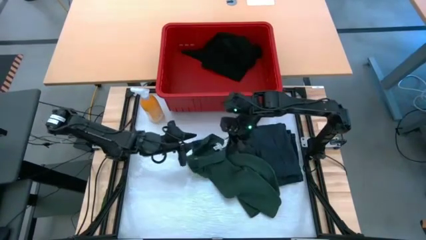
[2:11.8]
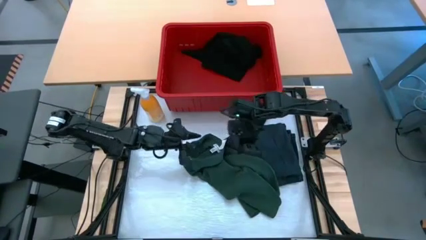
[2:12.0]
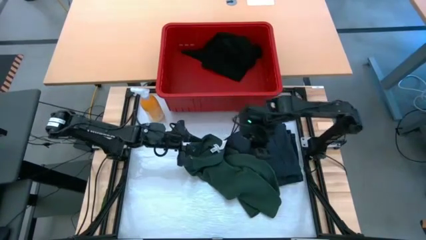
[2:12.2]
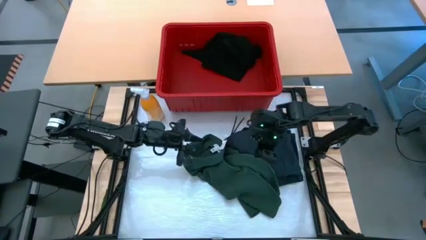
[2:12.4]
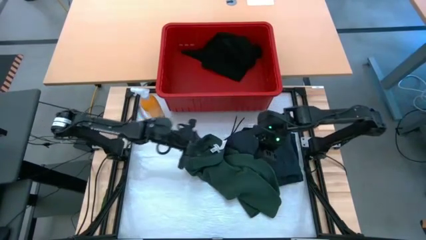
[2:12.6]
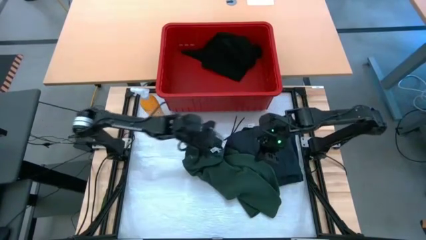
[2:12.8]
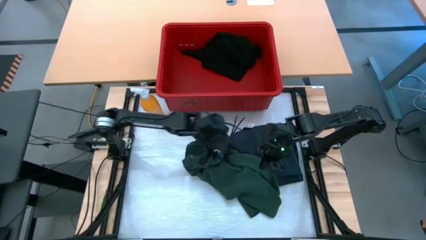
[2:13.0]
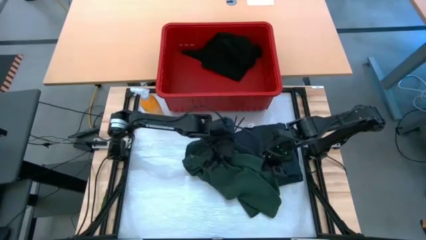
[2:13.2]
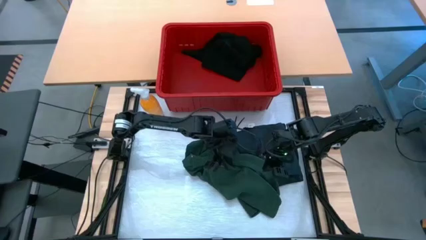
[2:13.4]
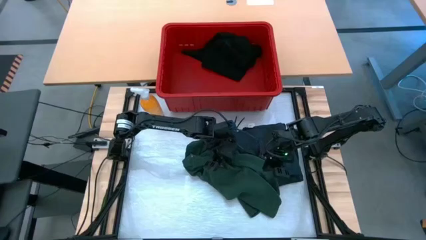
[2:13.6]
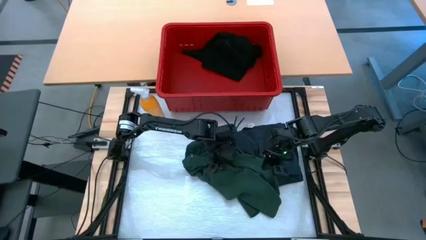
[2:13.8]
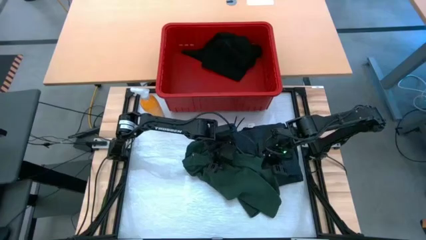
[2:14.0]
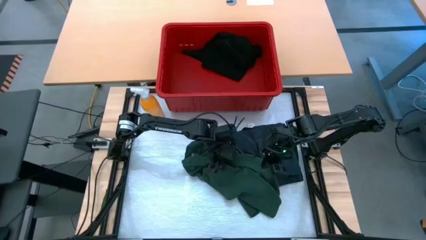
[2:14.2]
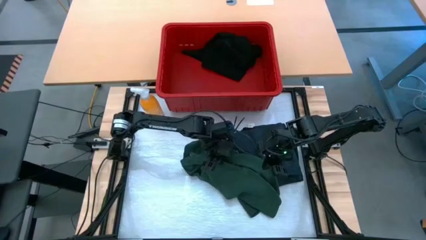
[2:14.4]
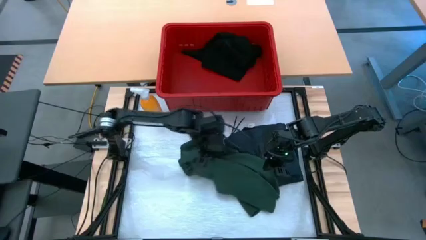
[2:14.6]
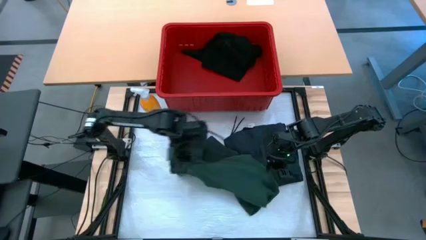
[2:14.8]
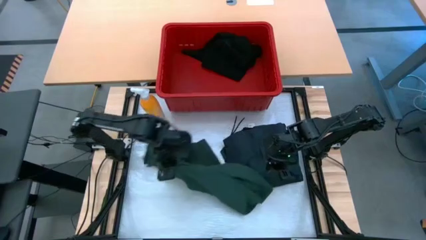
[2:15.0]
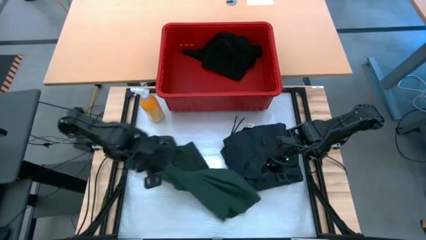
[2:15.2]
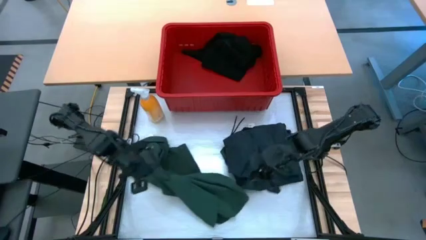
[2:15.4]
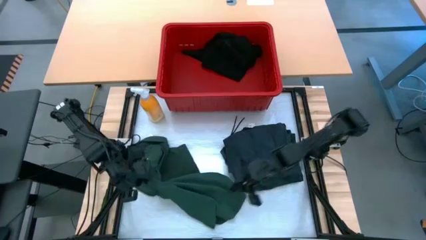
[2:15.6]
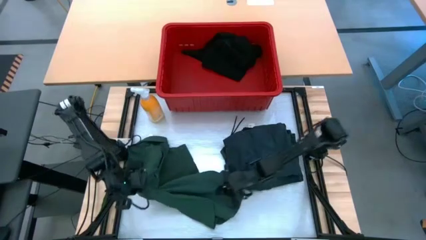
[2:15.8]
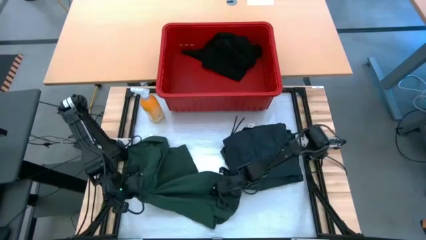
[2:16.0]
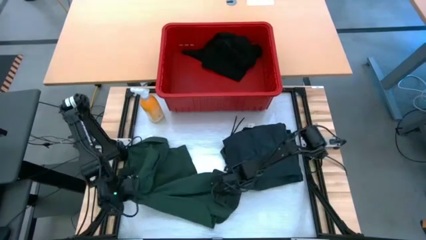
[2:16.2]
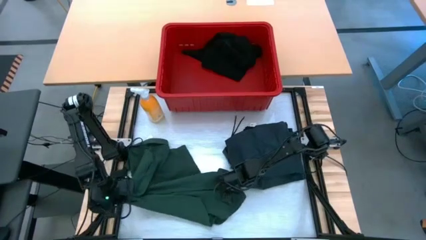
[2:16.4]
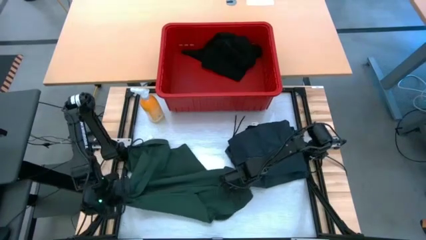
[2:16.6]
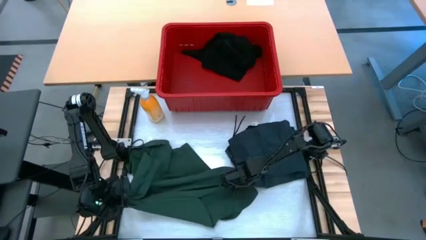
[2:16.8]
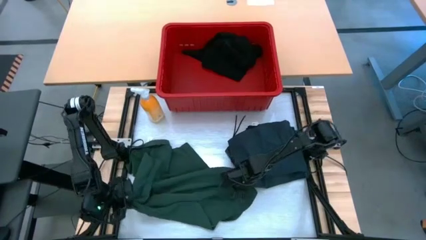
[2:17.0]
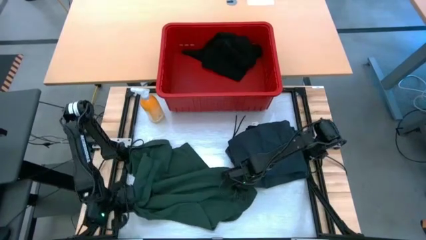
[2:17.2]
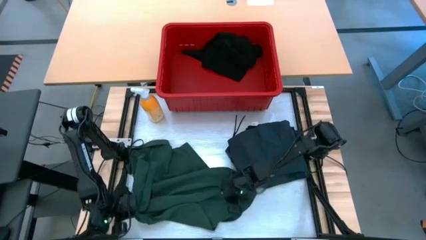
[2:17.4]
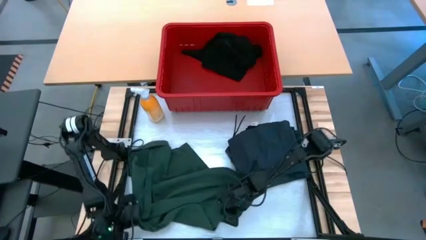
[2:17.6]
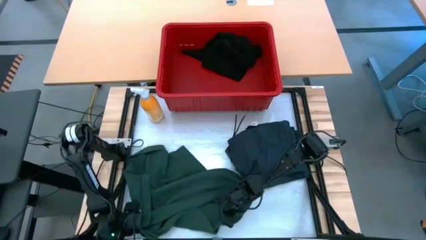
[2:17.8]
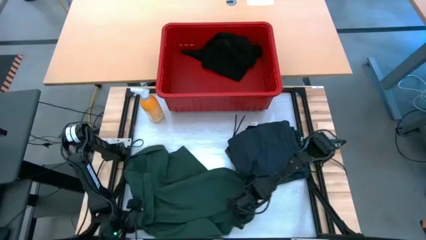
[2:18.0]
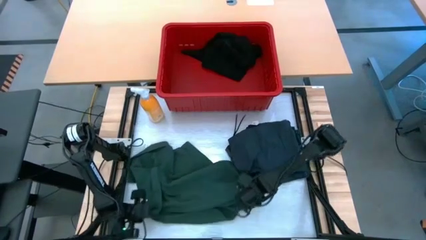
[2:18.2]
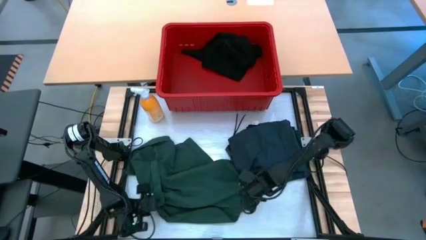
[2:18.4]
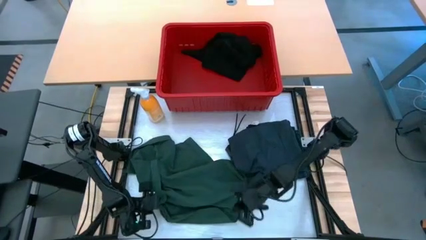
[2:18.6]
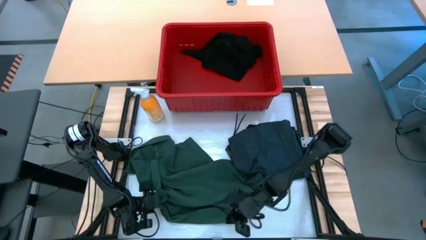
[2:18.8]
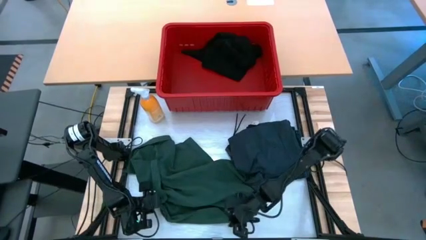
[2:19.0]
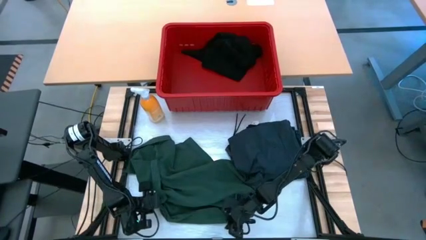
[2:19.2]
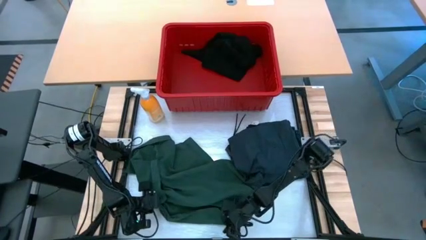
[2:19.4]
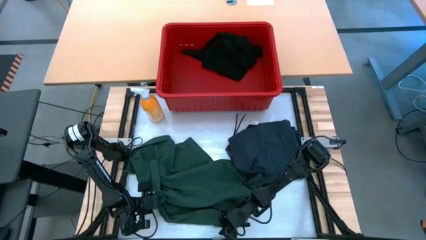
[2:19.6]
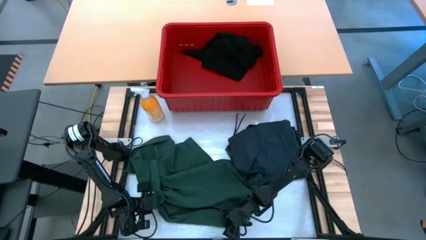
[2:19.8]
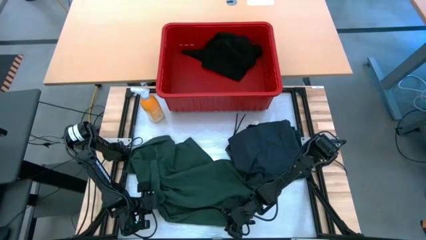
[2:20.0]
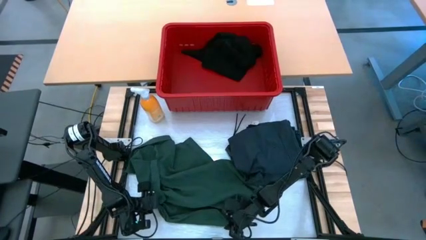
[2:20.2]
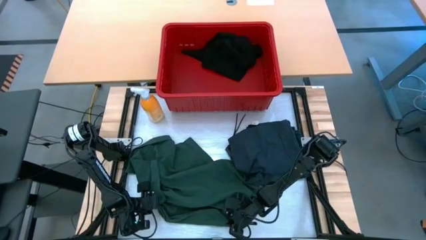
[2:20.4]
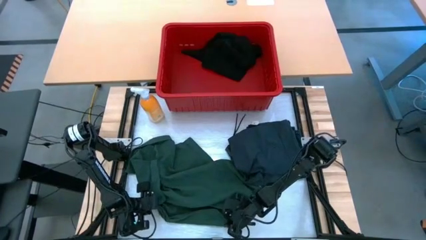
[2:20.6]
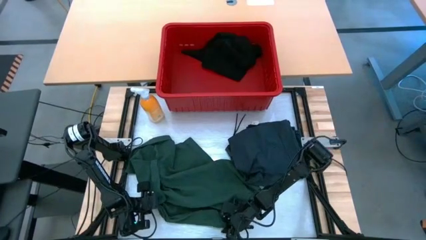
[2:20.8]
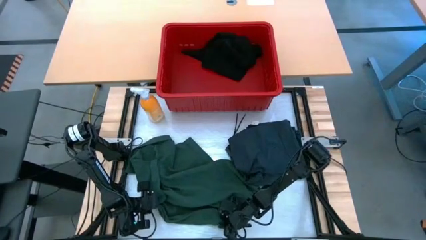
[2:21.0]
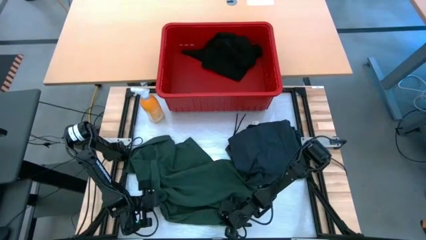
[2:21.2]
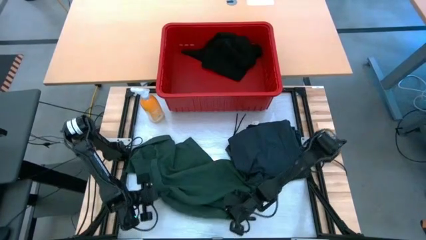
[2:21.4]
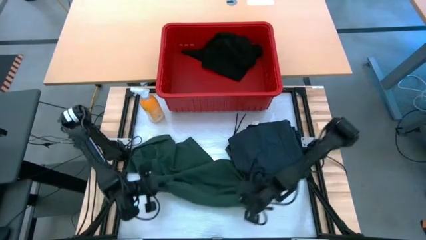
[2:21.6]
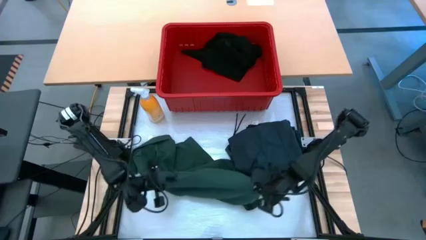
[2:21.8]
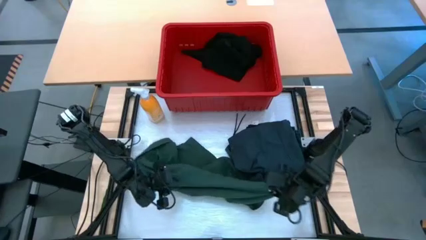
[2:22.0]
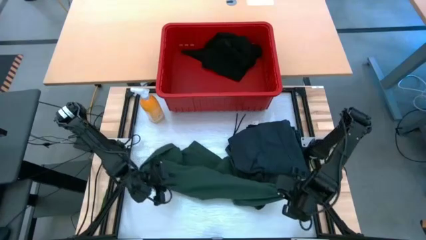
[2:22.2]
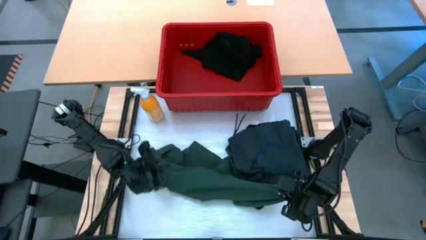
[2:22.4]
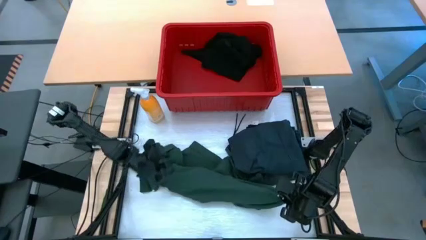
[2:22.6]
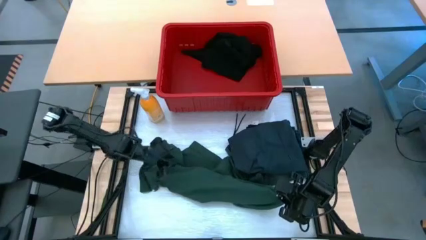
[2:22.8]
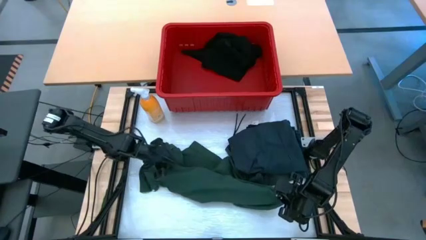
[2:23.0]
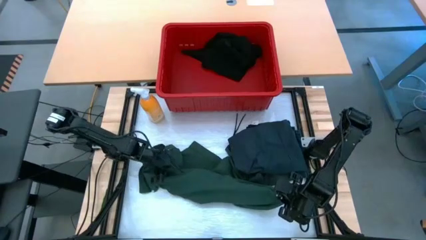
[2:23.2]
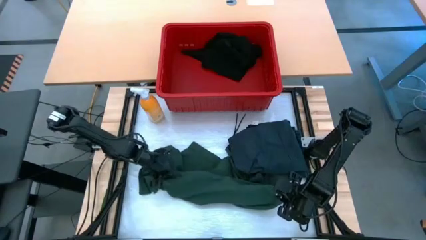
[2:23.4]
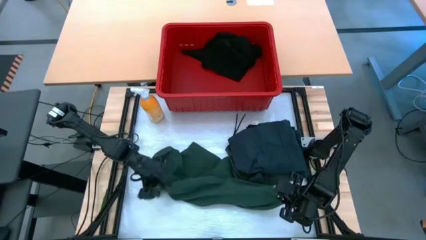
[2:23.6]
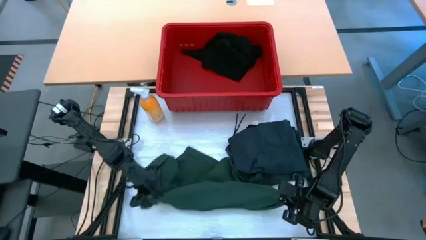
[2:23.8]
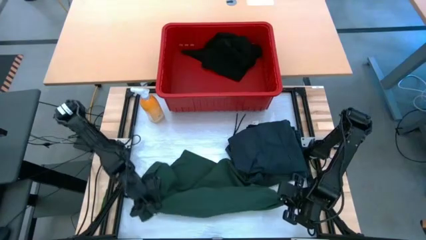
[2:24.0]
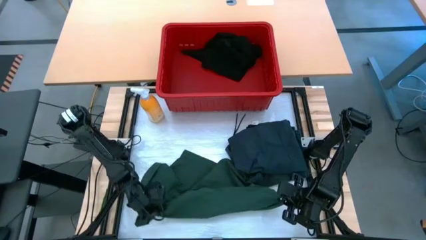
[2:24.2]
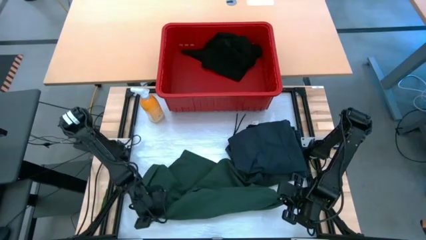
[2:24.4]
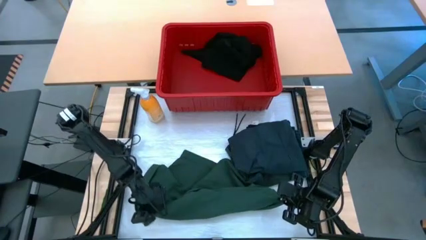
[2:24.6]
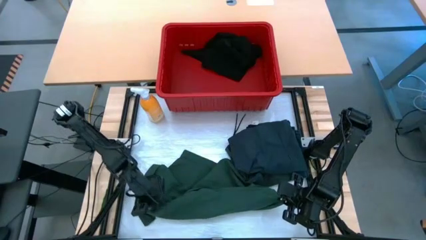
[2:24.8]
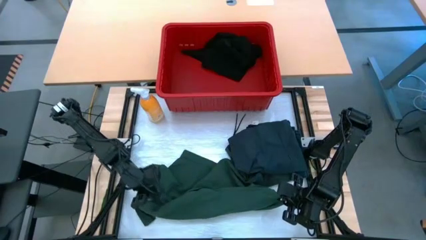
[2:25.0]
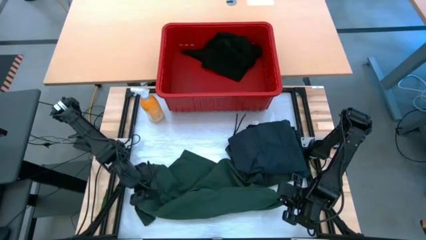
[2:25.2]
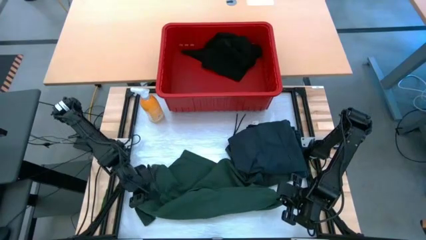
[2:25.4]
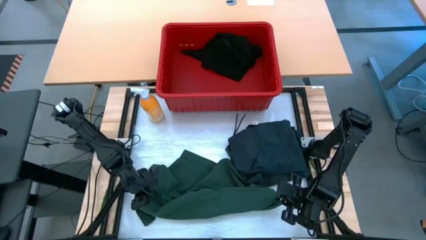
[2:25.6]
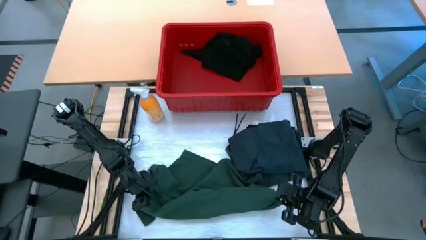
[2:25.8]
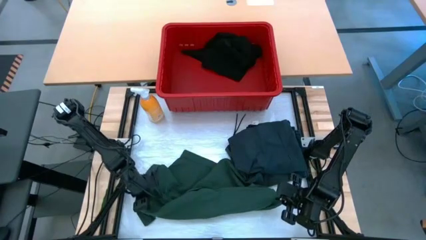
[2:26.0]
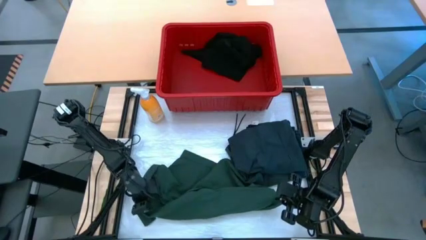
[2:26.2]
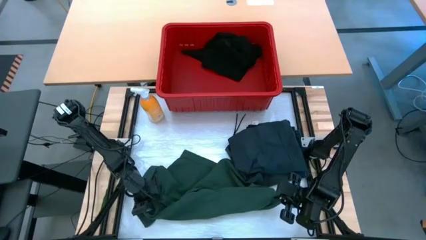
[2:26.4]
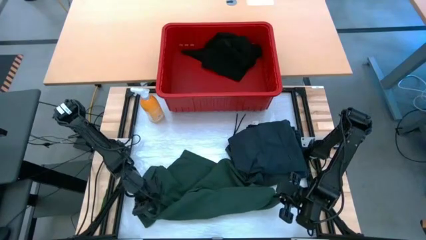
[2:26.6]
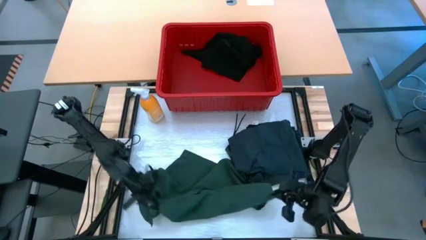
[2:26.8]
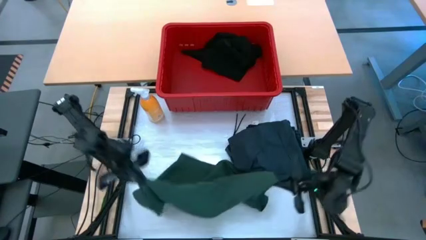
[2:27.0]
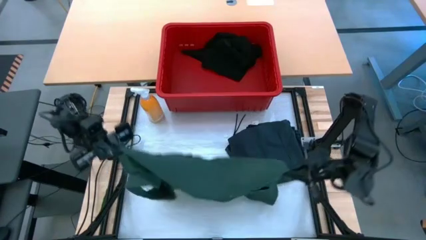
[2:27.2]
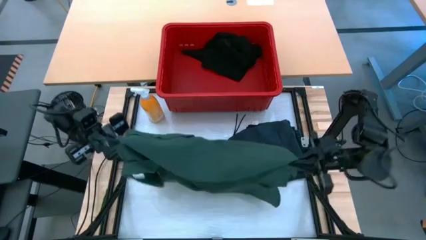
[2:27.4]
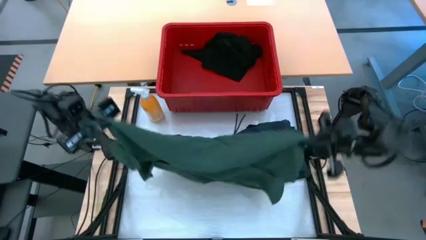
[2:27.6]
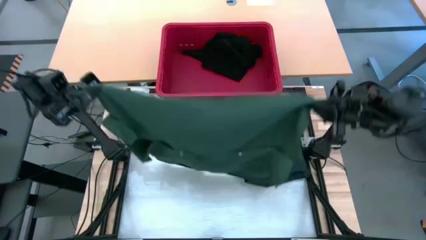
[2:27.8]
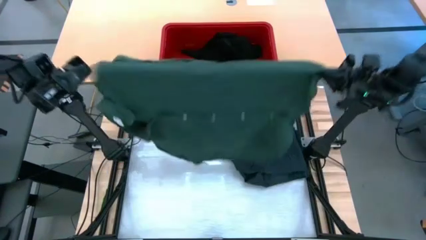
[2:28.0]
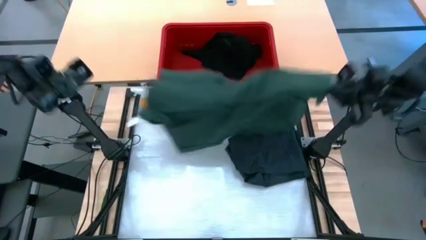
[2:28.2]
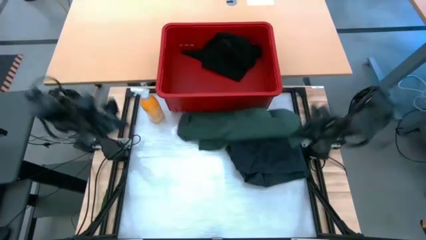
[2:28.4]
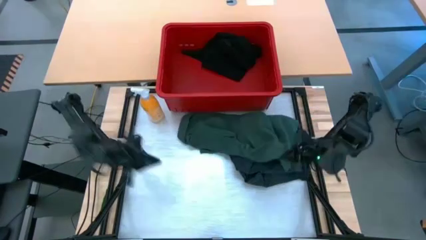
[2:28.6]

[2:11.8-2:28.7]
Task: Fold laundry
Fold the green shirt
